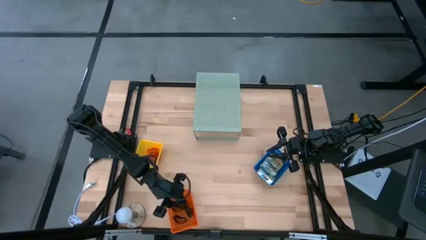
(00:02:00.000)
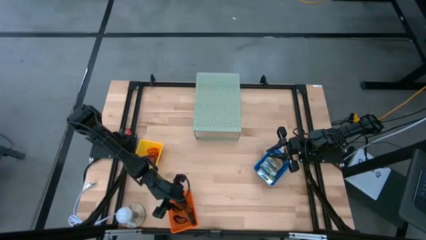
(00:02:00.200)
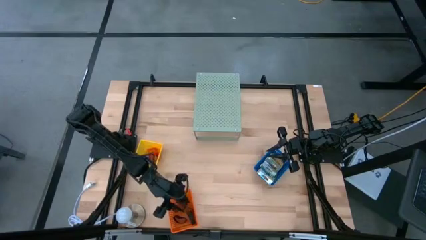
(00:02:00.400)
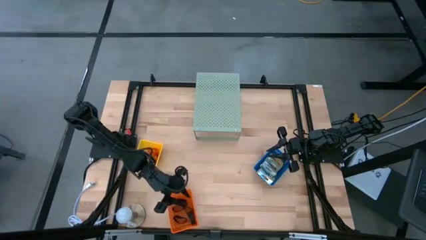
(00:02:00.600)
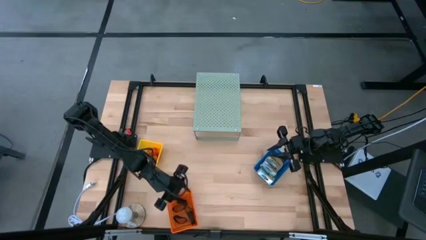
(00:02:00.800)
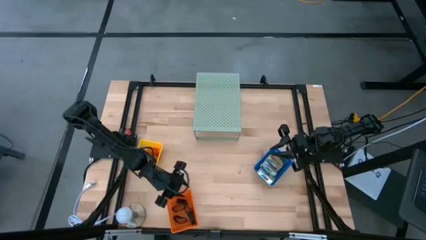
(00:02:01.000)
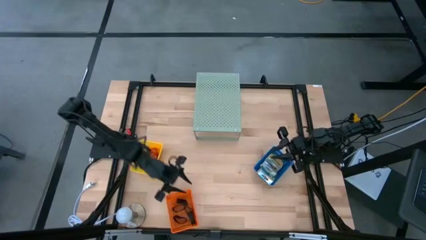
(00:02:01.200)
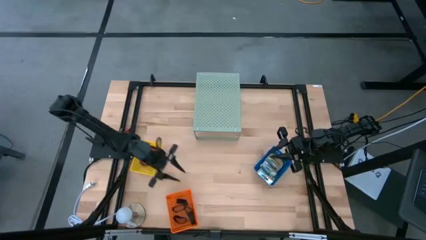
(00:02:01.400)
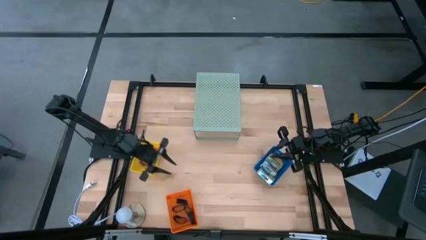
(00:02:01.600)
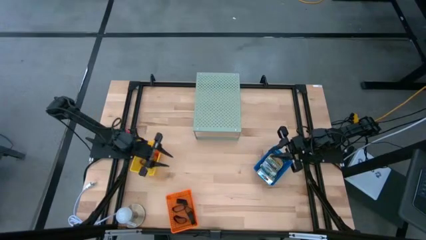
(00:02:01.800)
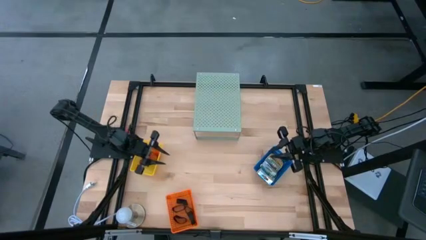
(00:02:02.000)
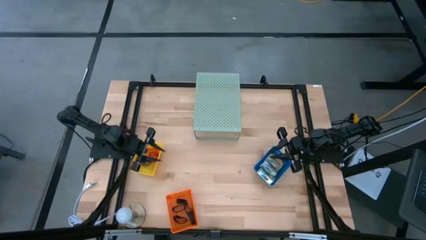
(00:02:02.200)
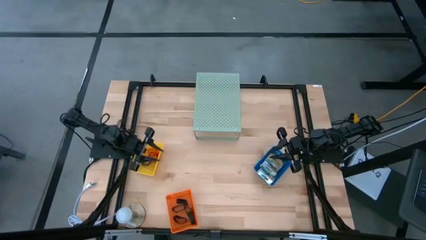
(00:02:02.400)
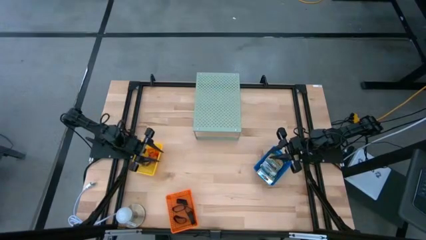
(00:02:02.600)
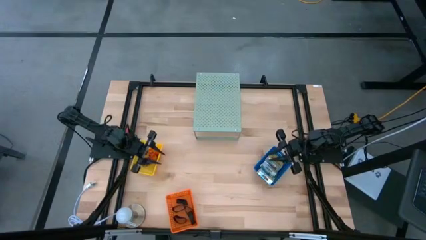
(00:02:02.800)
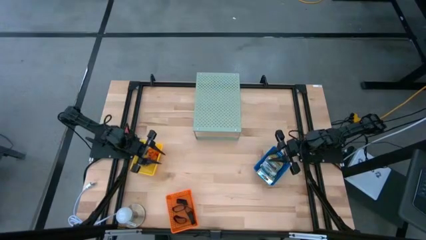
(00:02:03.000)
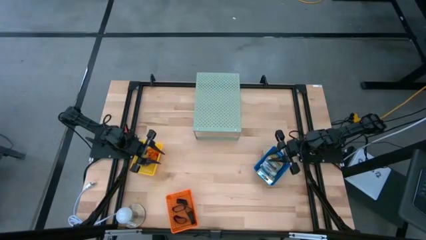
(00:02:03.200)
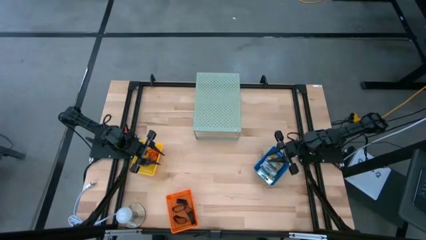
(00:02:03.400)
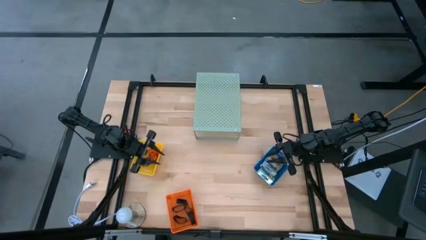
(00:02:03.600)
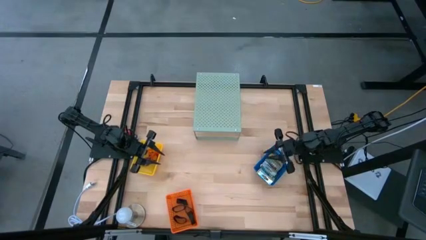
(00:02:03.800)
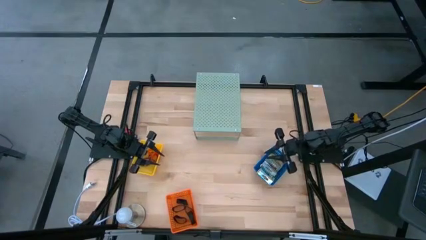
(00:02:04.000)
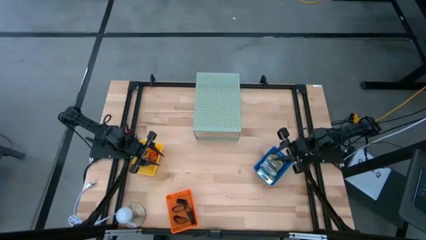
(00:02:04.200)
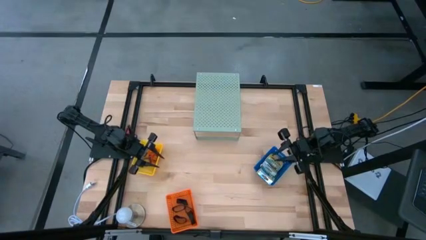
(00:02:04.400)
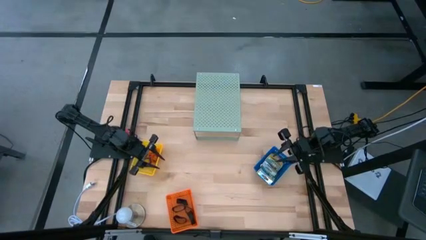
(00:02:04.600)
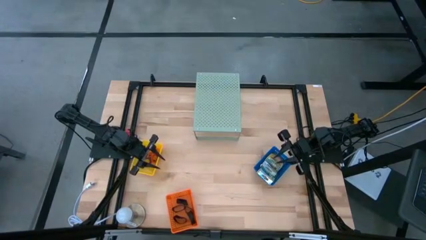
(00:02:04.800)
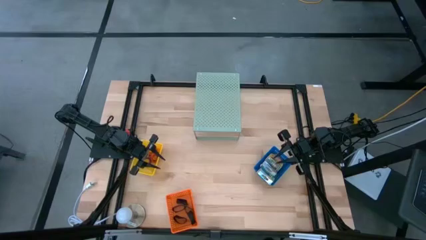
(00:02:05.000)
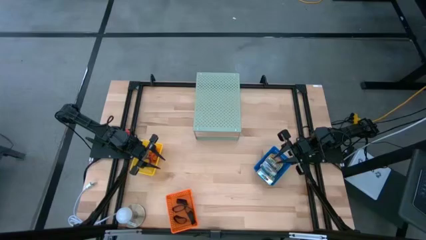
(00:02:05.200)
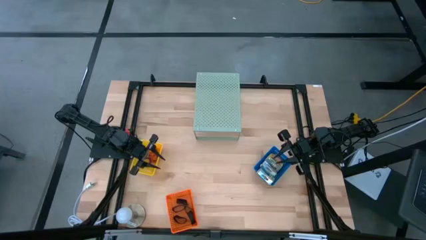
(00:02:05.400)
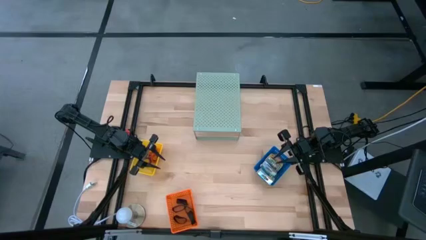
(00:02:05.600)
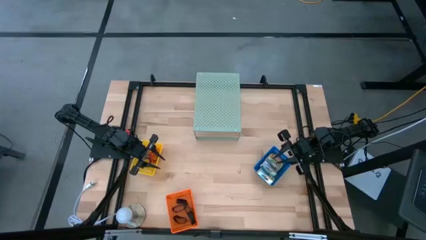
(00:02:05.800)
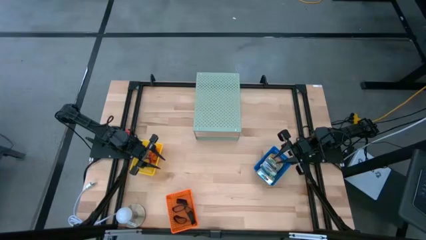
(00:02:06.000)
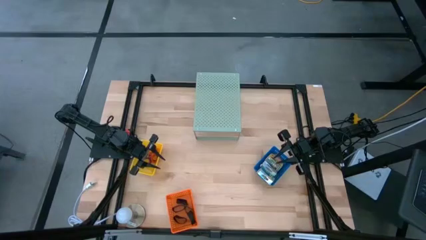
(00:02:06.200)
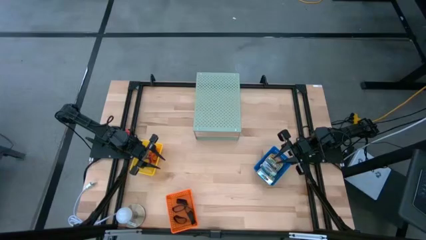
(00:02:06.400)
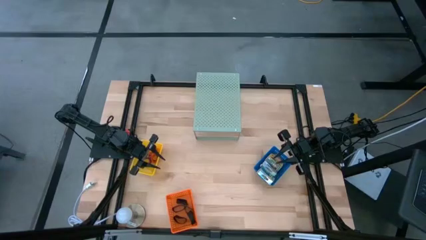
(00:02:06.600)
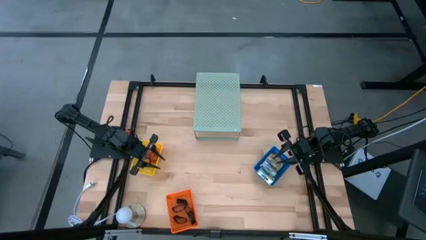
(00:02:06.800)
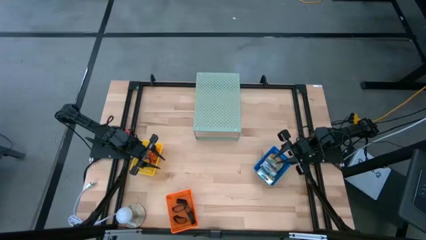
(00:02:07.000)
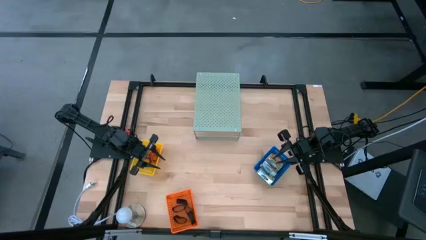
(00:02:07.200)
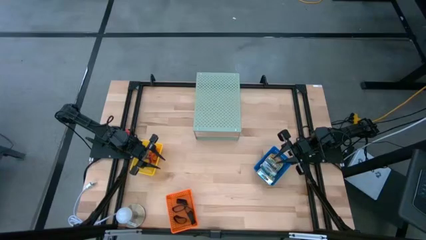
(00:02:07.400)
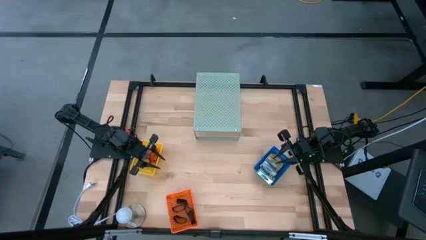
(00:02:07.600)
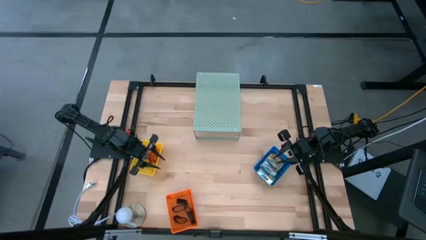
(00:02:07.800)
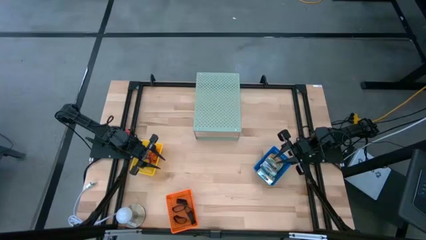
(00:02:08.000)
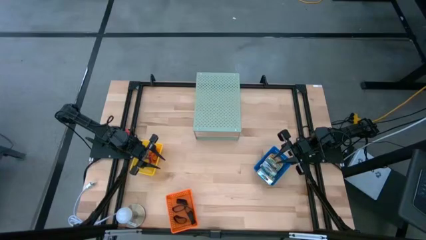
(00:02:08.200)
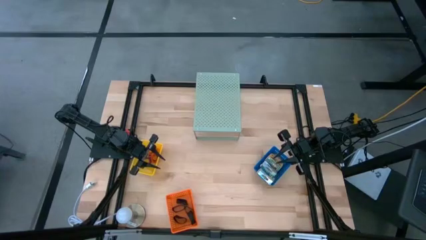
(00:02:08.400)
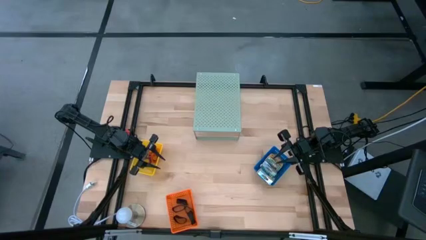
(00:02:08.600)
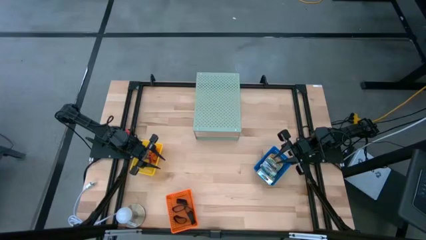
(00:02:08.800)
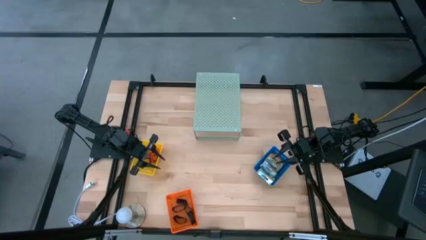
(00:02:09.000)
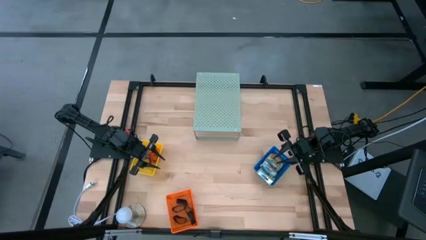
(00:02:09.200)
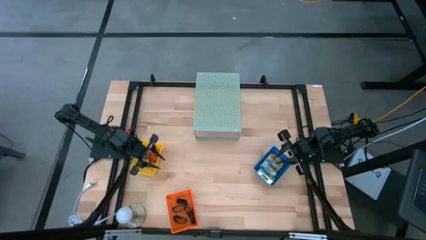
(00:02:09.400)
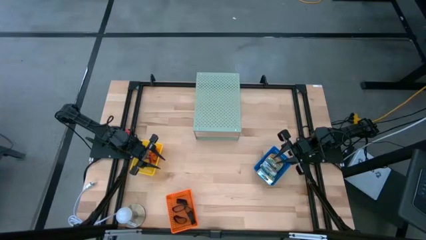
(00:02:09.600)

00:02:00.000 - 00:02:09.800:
Task: Pick & Place Office Desk Supplies
Return to Home Position

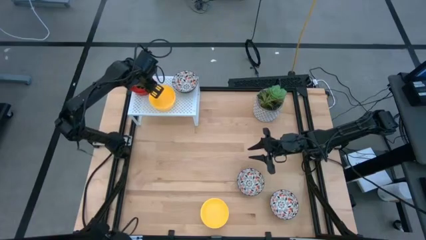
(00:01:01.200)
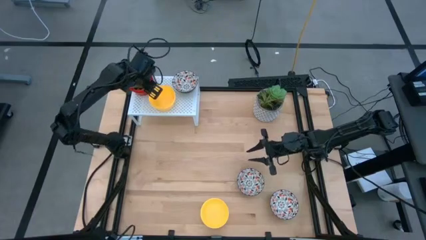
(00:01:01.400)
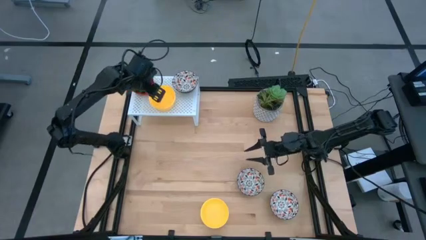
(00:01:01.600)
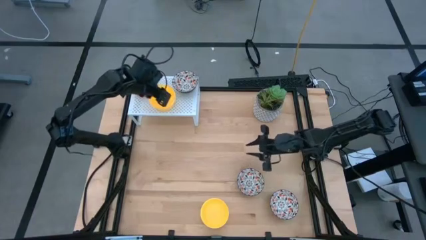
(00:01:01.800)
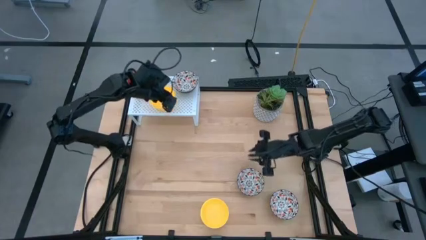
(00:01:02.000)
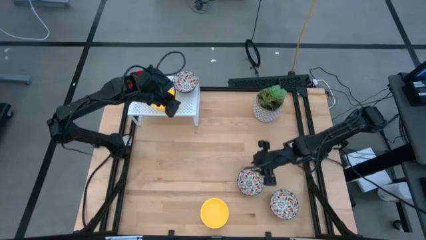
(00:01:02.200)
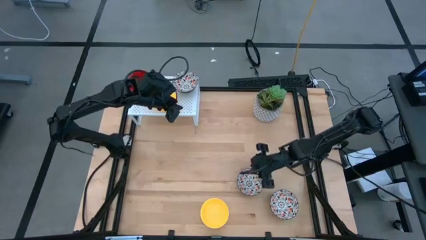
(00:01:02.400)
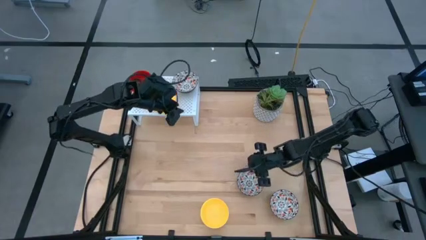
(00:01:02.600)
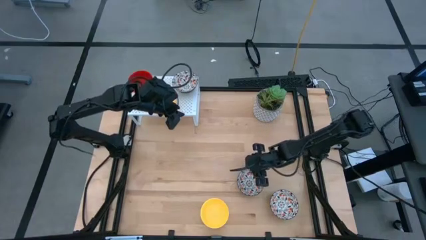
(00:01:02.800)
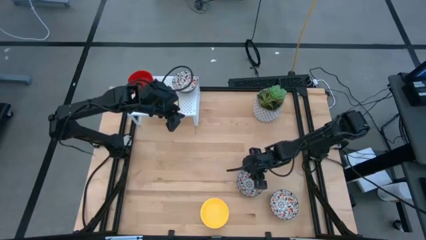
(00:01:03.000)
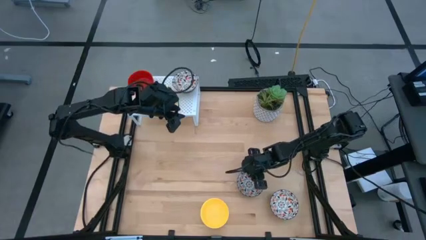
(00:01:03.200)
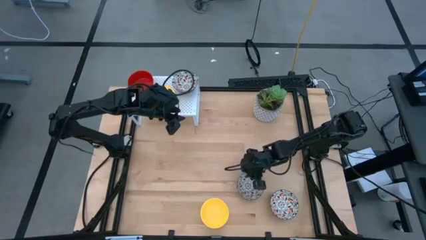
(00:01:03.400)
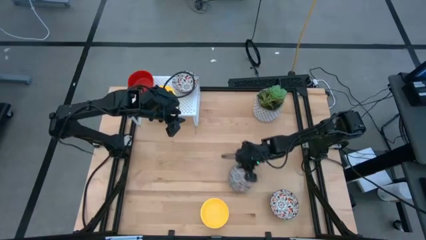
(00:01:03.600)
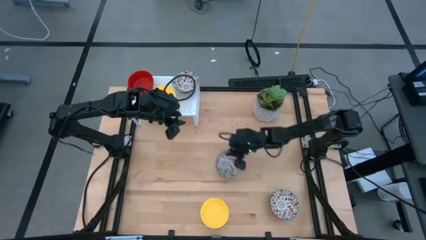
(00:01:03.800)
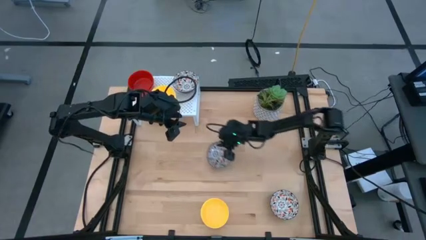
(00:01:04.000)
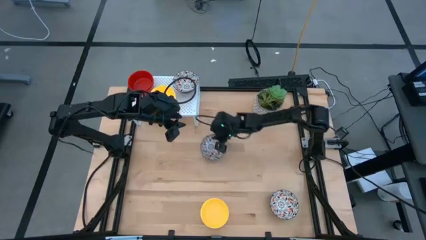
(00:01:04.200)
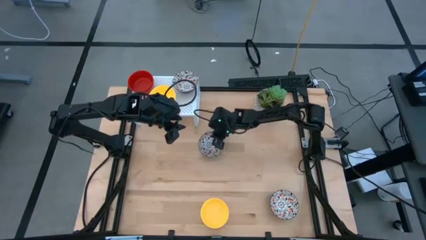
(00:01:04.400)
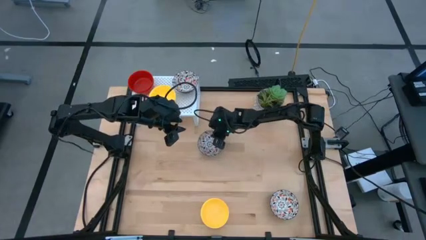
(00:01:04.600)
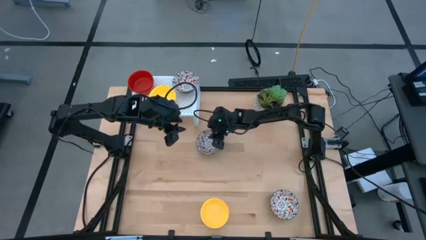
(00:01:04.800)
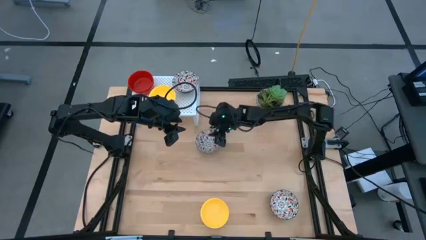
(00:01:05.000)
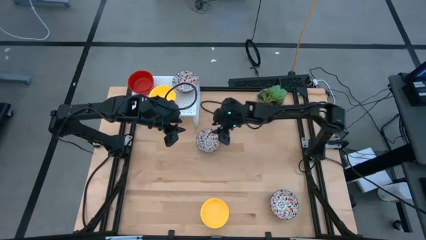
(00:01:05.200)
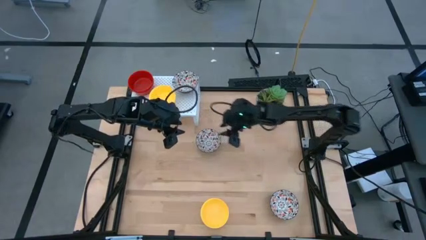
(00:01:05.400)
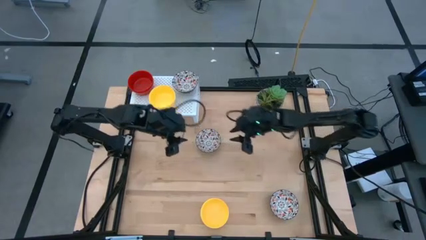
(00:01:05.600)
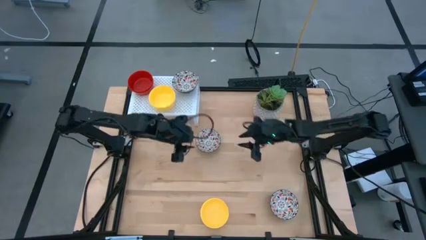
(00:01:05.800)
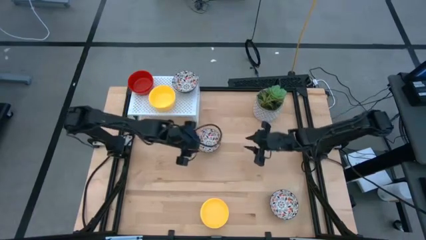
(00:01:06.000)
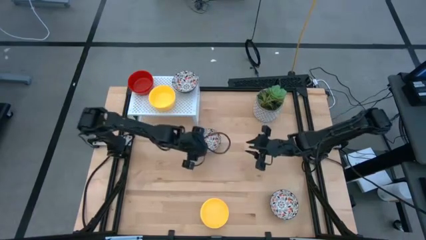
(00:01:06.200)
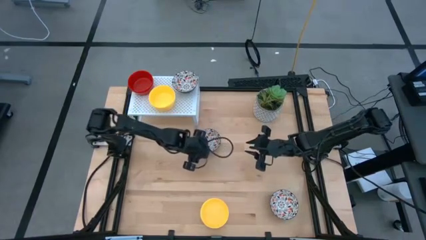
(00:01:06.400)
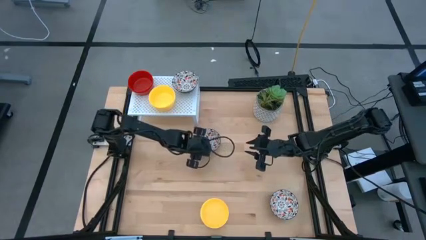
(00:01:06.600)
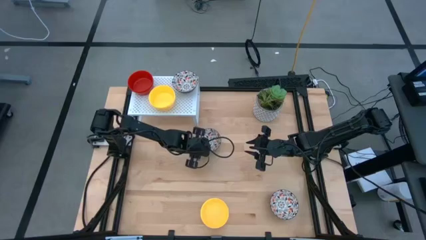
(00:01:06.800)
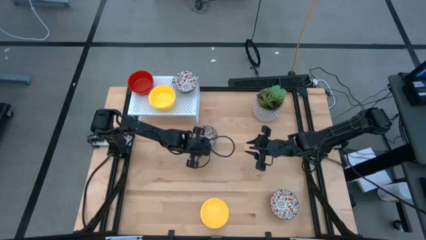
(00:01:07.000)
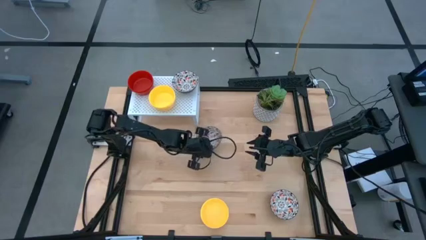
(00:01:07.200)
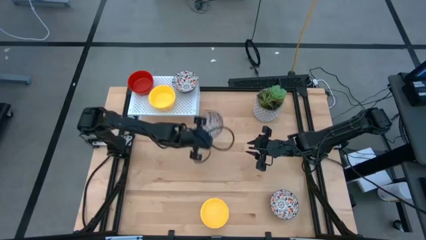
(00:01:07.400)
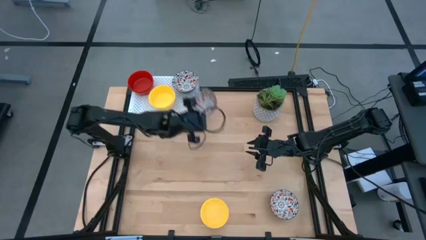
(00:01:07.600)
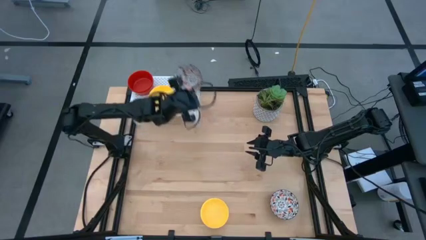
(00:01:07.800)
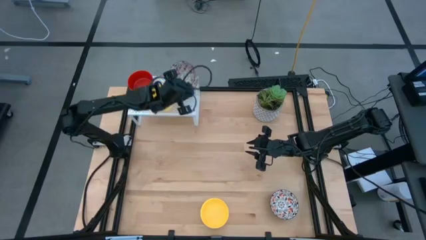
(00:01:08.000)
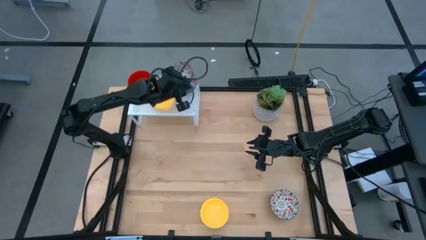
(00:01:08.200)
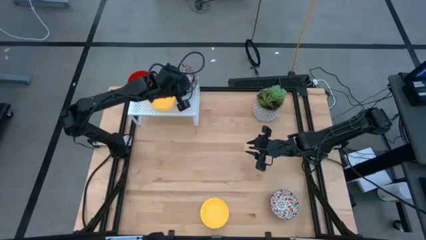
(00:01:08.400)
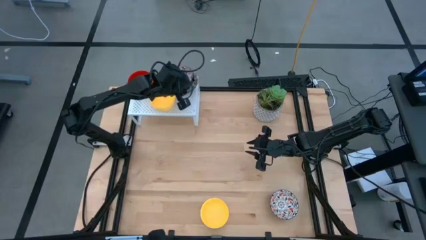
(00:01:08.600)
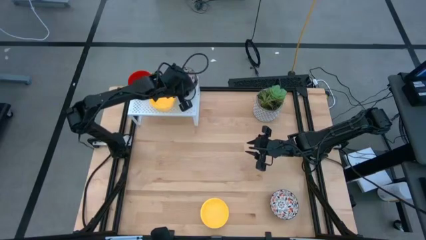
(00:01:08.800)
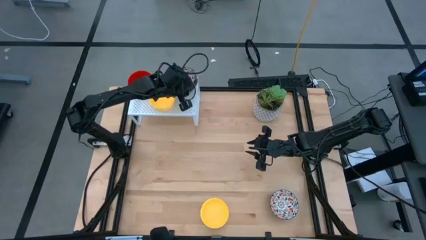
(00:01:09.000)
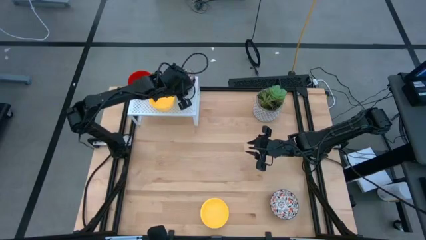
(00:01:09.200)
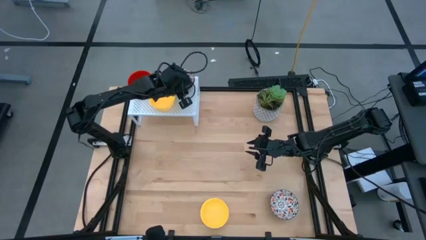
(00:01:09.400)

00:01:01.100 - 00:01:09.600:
Task: Pick & Place Mini bowls
Stack the top white patterned bowl on the white patterned bowl on the shelf
